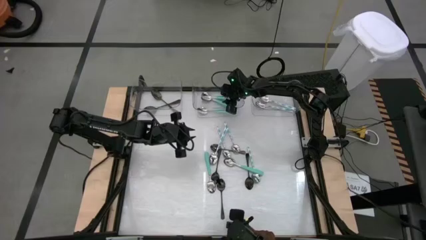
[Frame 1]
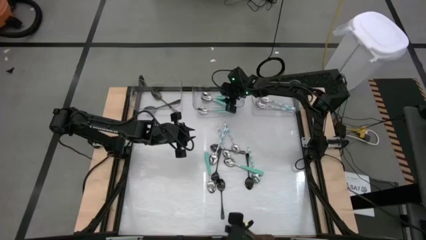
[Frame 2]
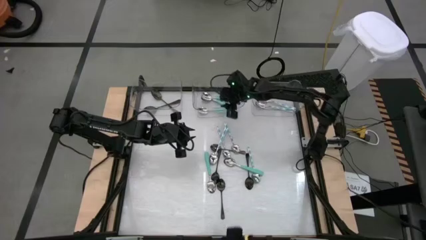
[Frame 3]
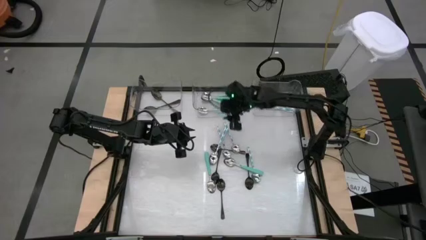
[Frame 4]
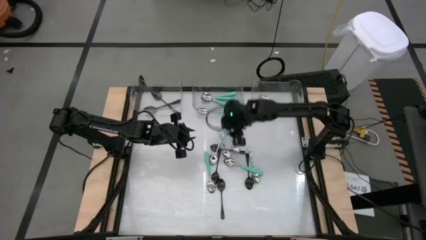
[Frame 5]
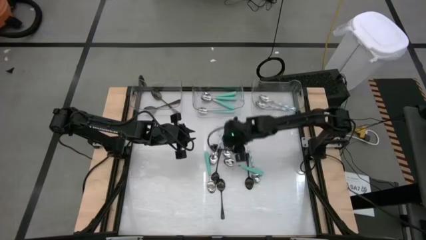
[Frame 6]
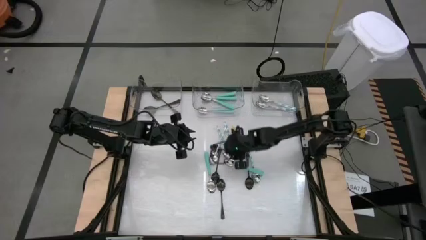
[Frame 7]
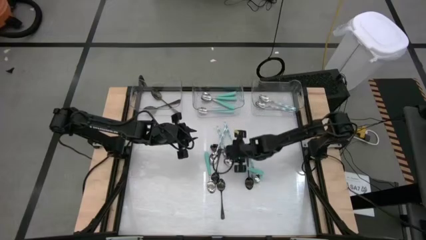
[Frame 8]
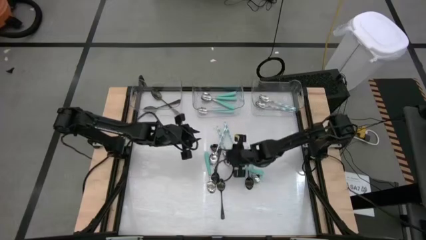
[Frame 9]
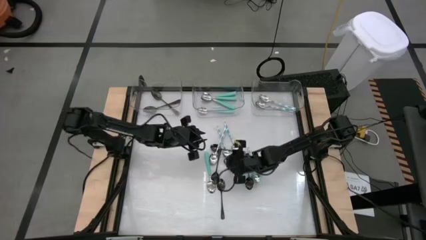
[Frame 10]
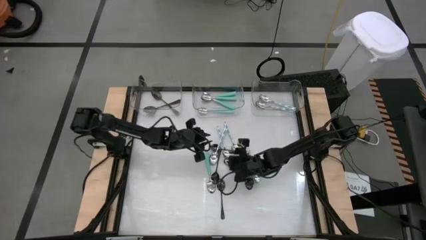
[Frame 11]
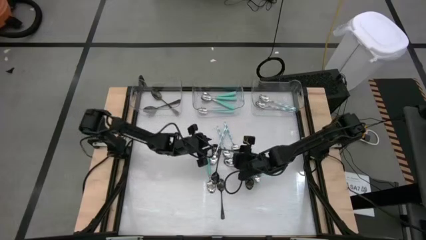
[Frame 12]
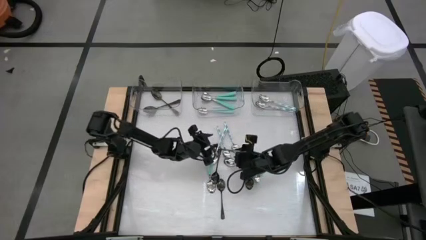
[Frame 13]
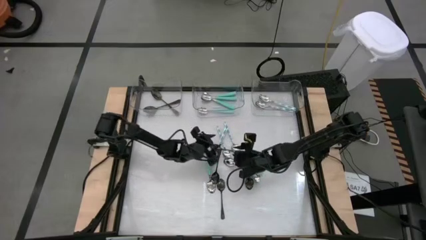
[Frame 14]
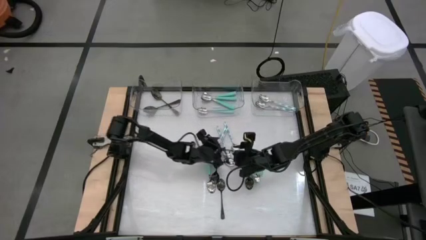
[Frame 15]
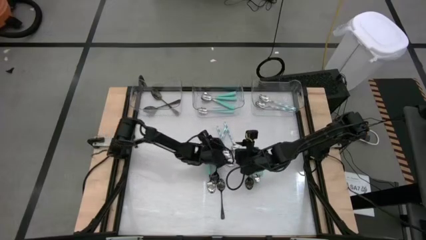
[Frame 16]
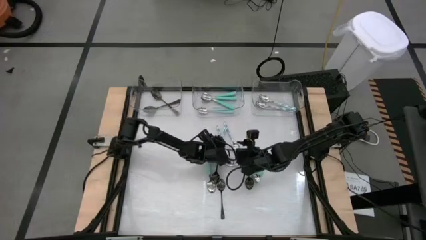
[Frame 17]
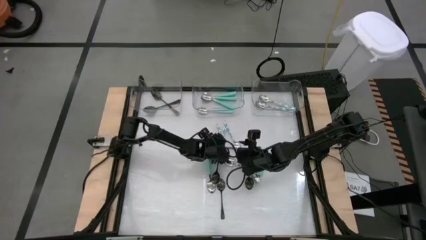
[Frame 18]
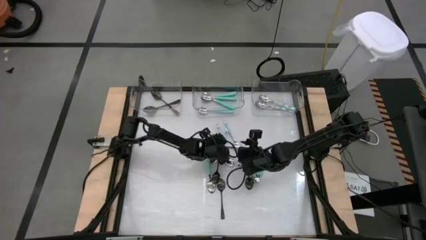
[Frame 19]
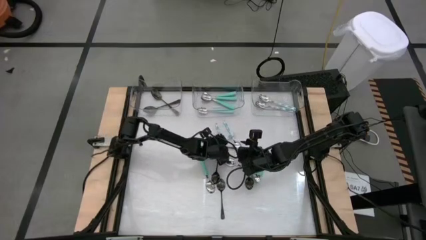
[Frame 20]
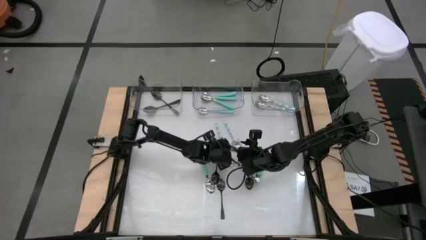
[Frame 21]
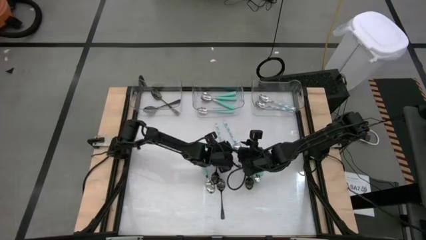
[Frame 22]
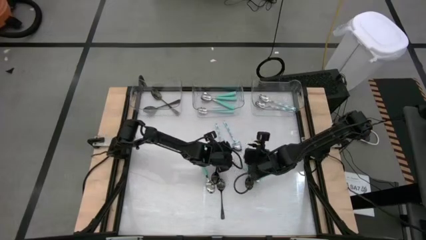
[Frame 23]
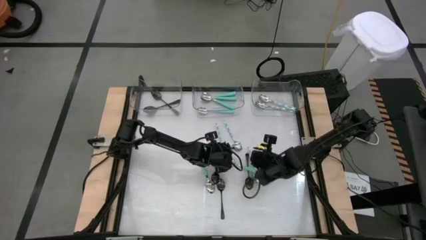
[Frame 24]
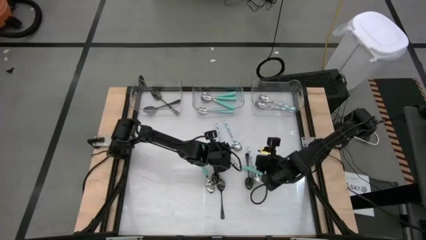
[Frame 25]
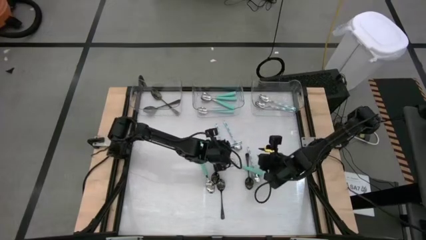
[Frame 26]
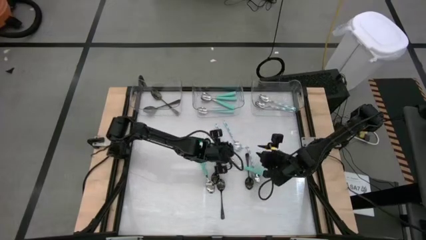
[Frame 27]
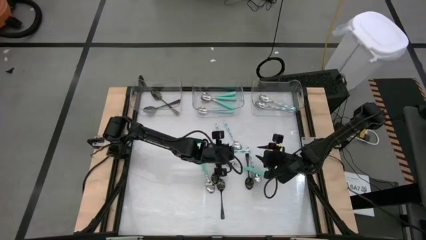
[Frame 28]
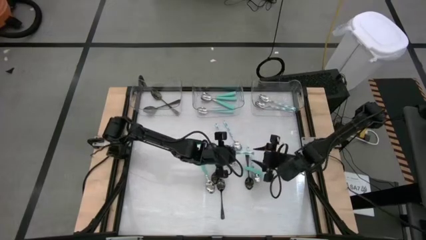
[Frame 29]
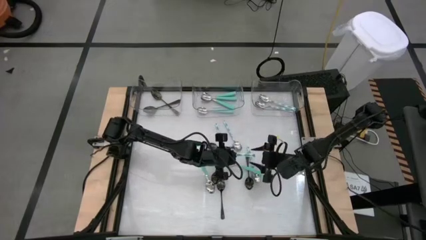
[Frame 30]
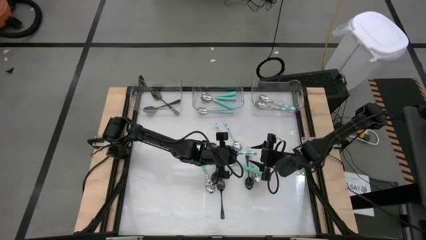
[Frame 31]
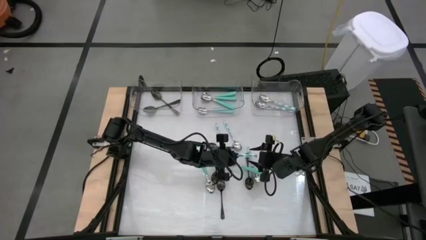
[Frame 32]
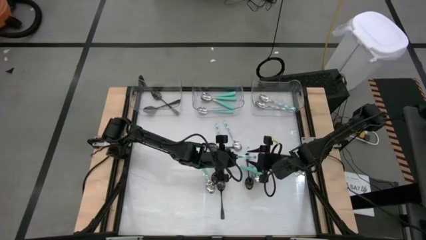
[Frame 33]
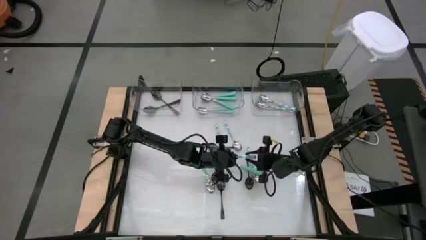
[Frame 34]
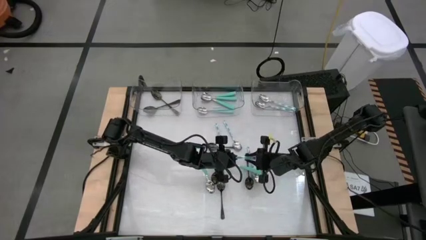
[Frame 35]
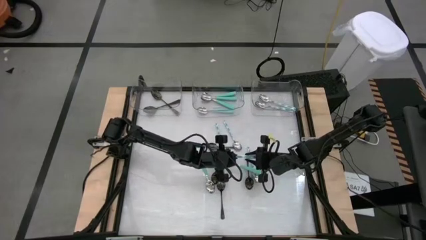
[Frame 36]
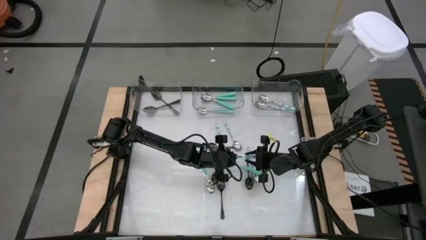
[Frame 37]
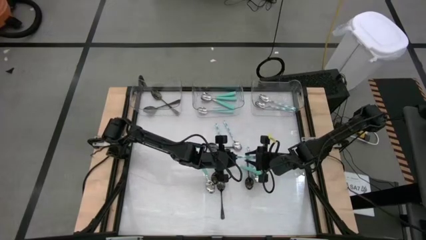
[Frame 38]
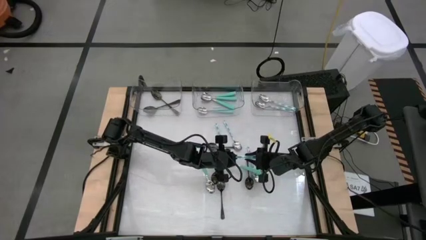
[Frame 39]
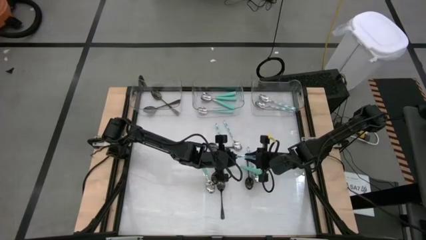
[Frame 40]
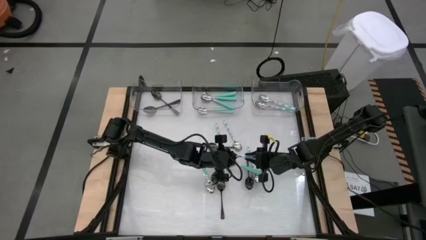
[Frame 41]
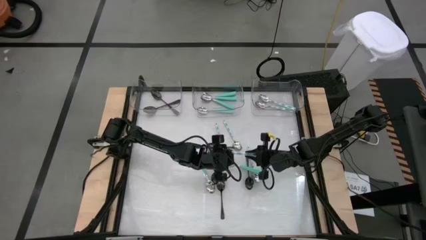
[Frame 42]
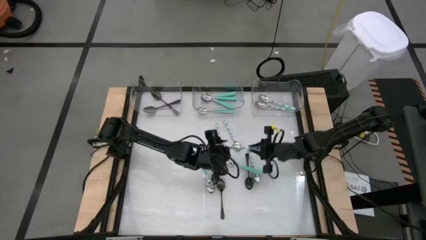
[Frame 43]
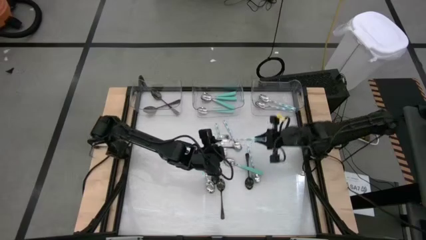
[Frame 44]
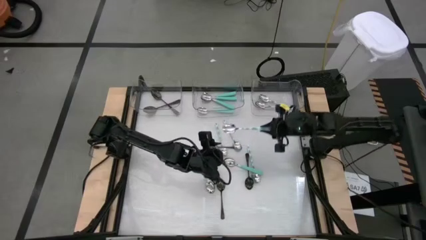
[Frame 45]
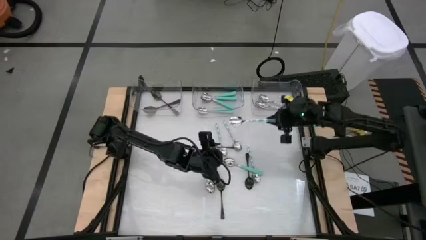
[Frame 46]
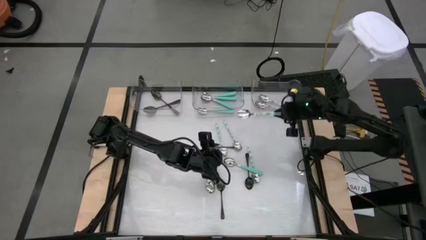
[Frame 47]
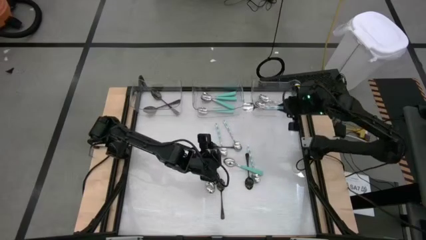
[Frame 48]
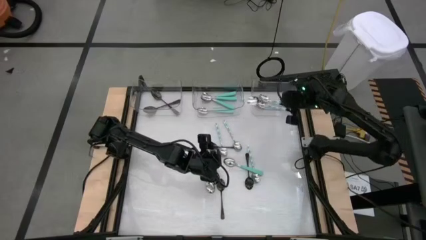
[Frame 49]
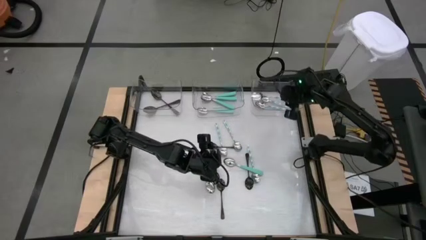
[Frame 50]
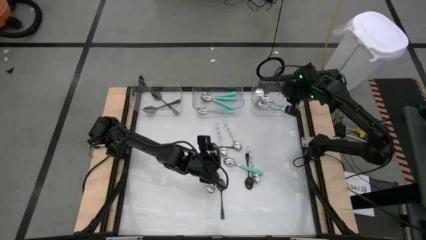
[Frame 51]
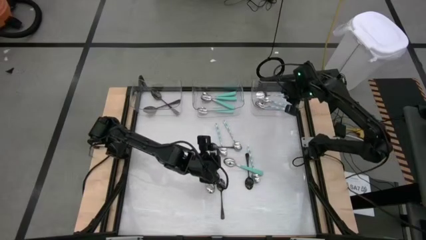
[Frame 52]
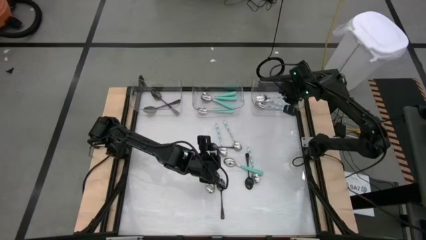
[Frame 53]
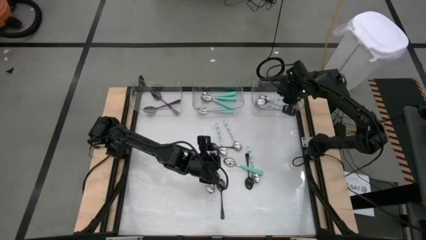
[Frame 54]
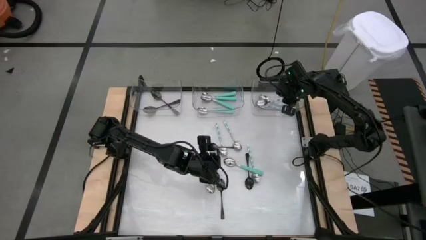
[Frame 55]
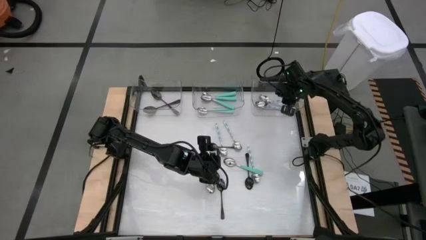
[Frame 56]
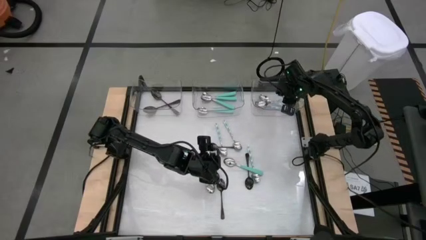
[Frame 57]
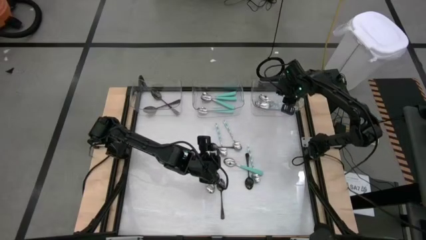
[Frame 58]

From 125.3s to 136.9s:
Task: Sort silverware by color (type)
Put the green patterned spoon into the right transparent bin

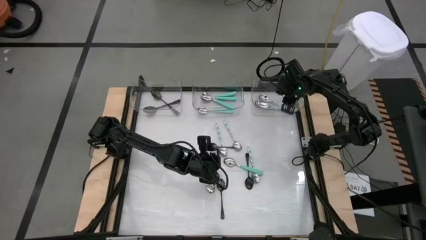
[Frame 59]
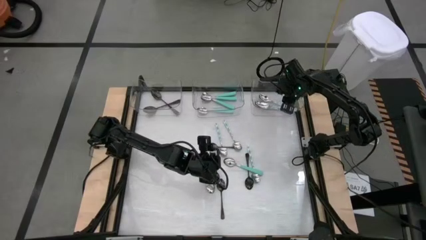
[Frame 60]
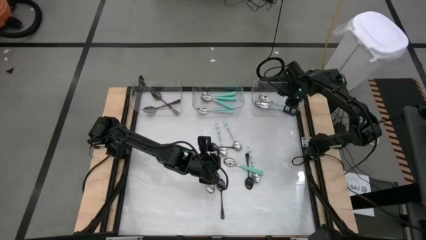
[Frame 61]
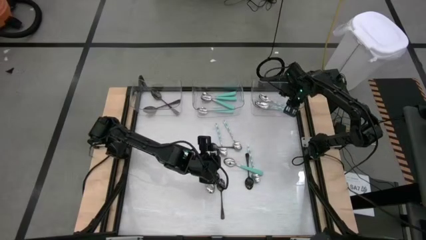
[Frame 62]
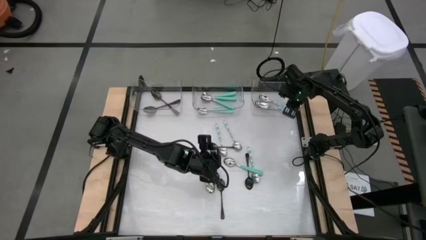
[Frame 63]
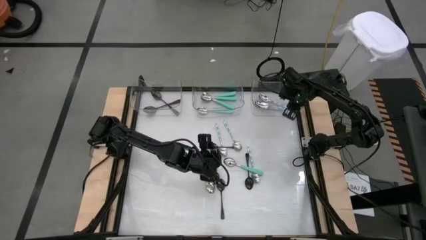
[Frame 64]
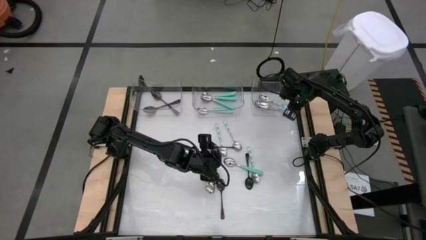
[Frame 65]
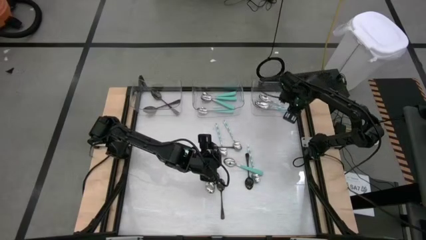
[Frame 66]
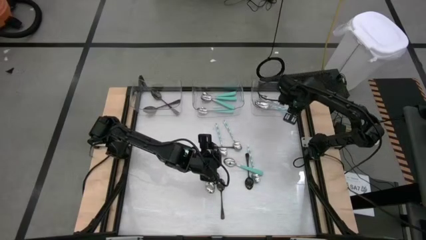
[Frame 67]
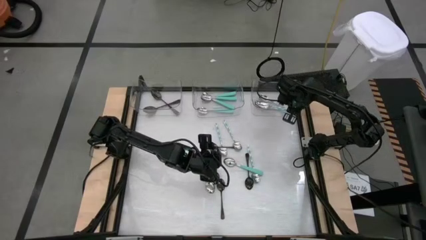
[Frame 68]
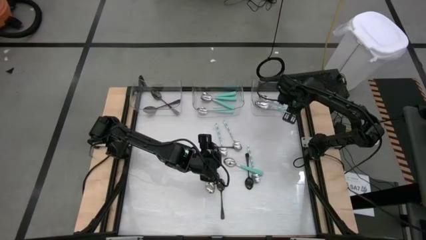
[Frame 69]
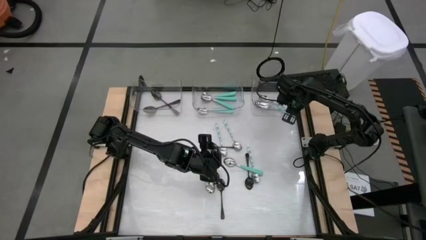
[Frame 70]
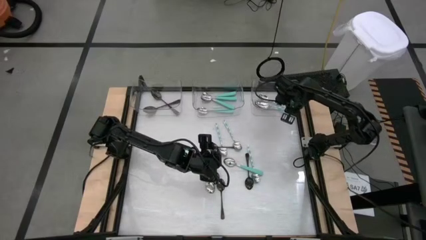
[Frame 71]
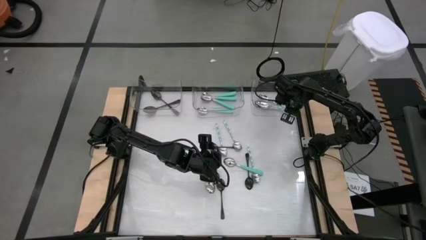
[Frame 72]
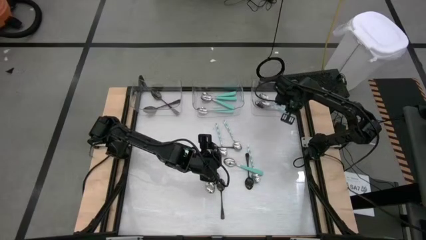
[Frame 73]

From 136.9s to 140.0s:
Put the green patterned spoon into the right transparent bin

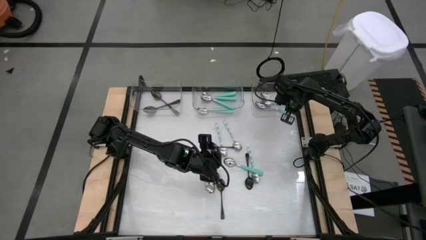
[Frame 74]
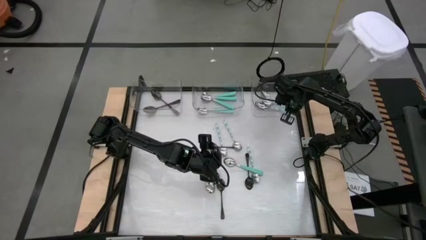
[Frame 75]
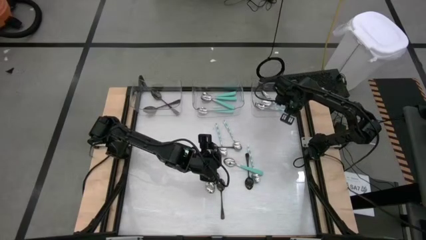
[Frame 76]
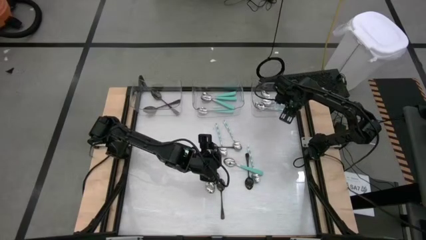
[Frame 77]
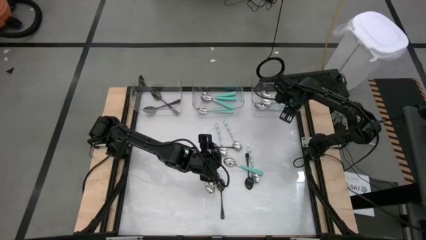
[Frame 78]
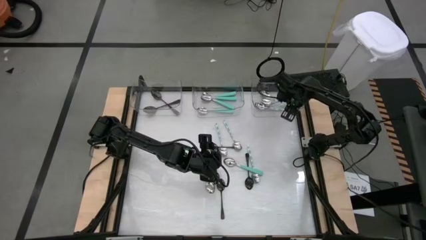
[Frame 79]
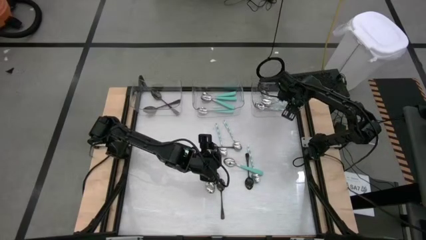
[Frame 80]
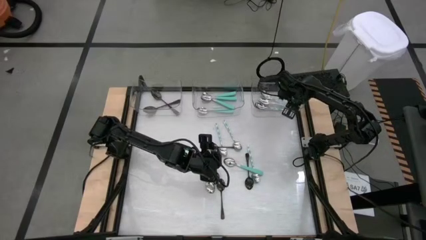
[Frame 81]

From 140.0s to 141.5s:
Put the green patterned spoon into the right transparent bin
